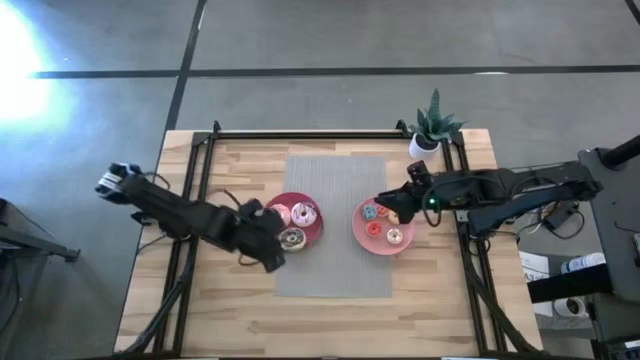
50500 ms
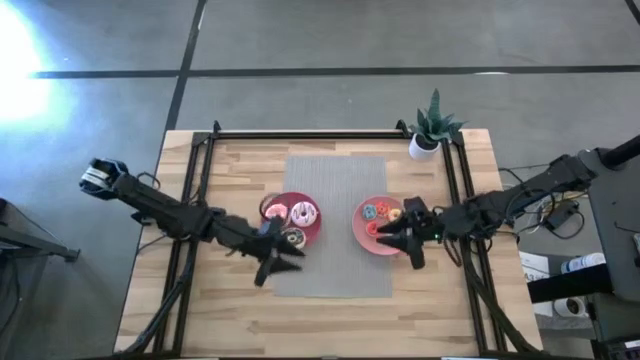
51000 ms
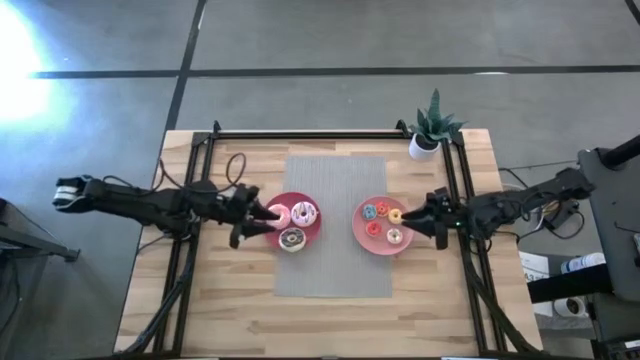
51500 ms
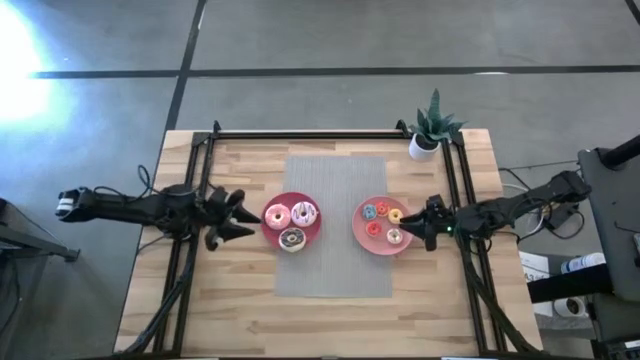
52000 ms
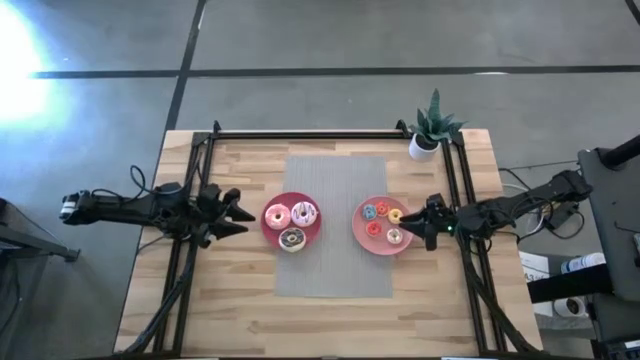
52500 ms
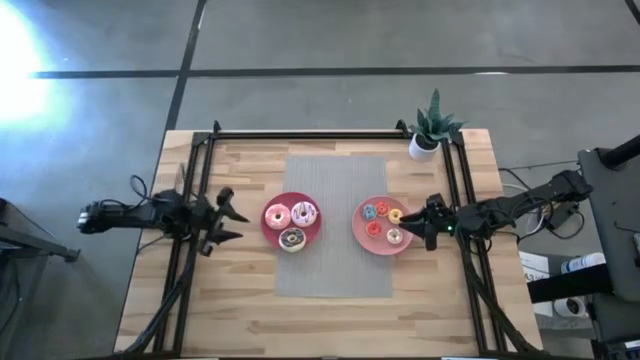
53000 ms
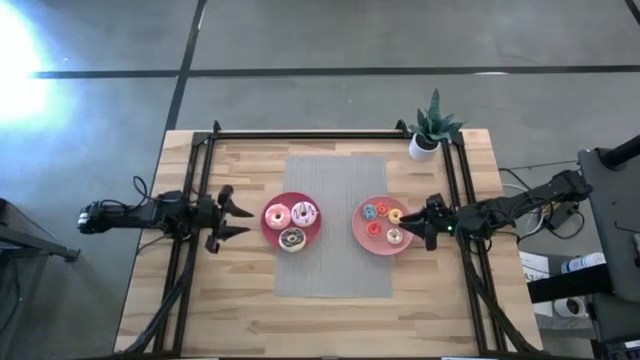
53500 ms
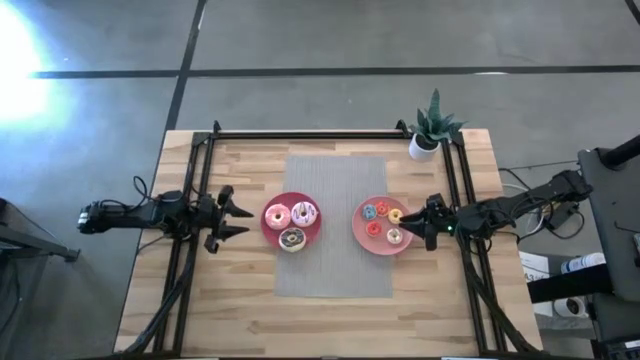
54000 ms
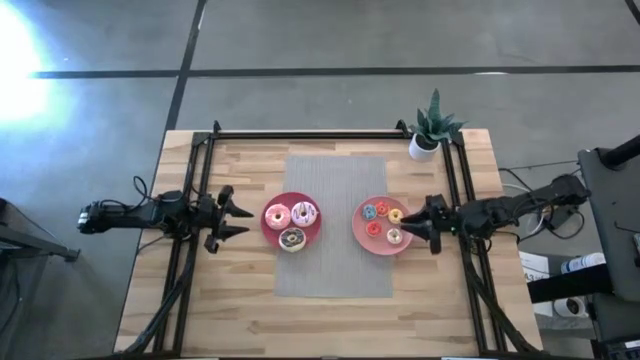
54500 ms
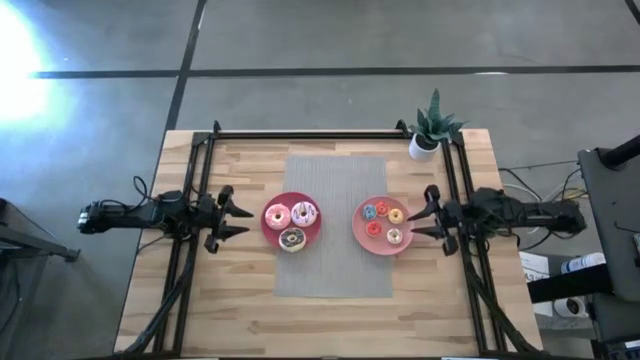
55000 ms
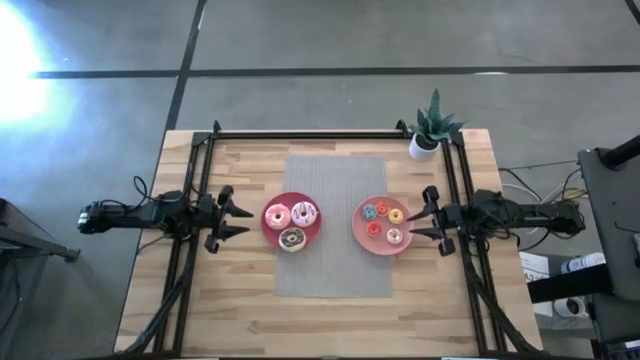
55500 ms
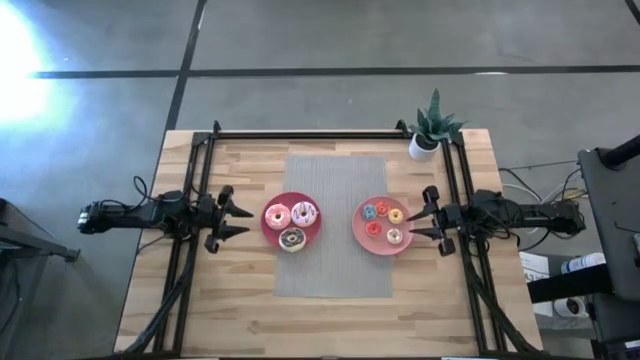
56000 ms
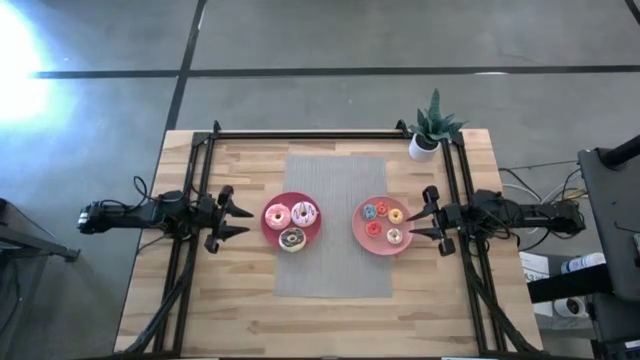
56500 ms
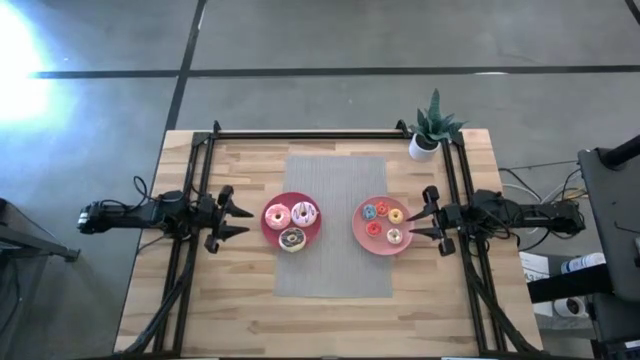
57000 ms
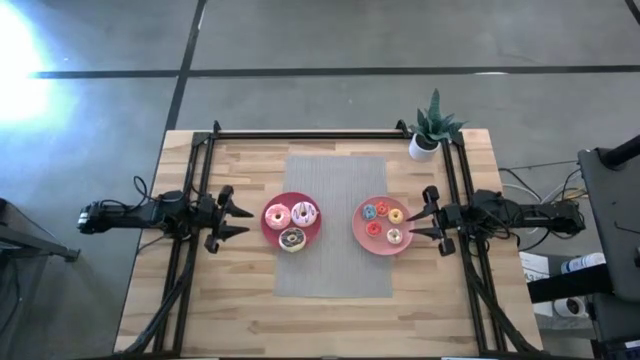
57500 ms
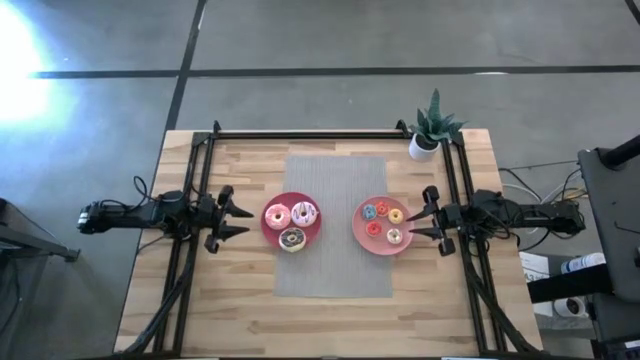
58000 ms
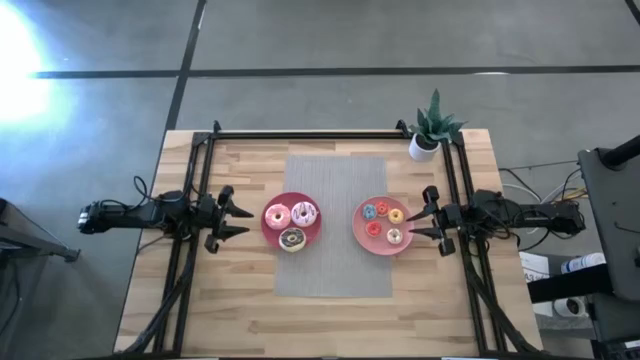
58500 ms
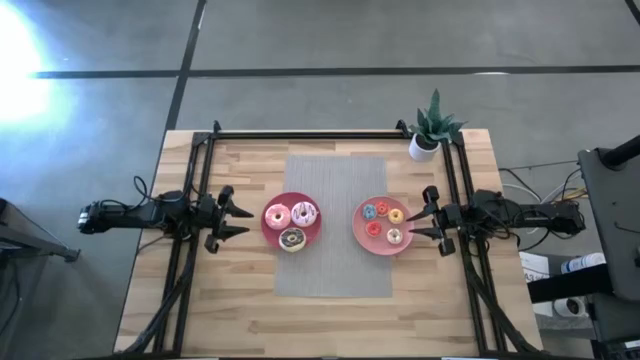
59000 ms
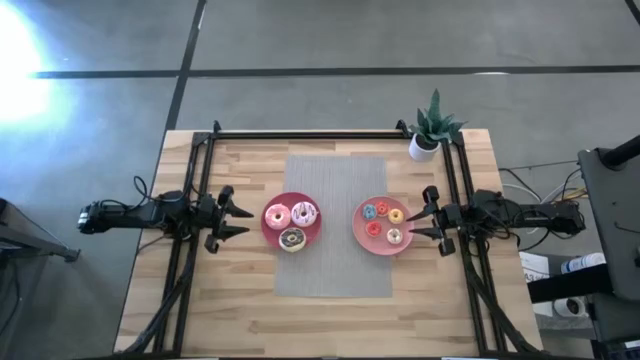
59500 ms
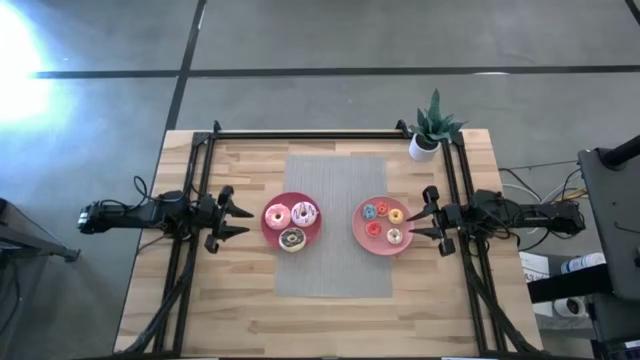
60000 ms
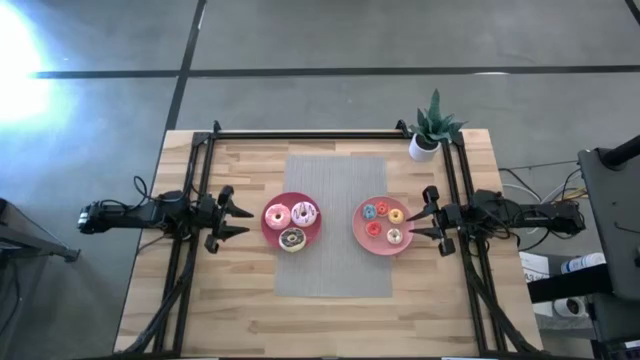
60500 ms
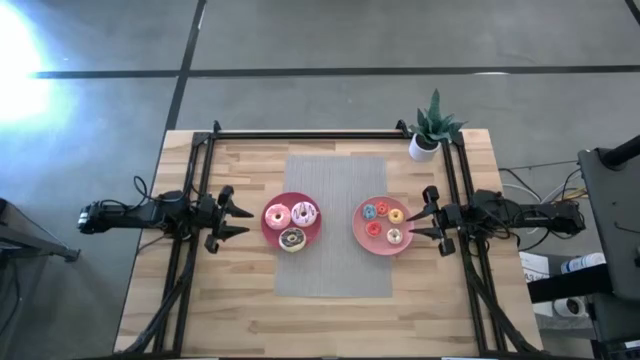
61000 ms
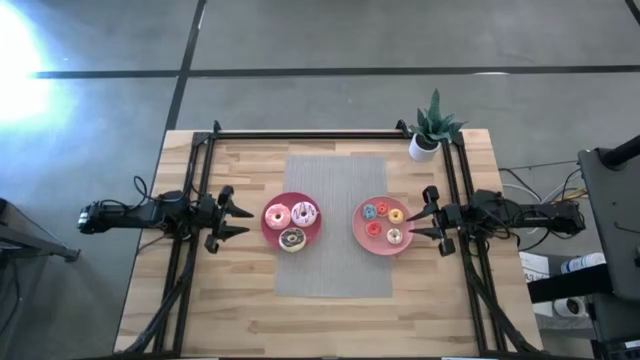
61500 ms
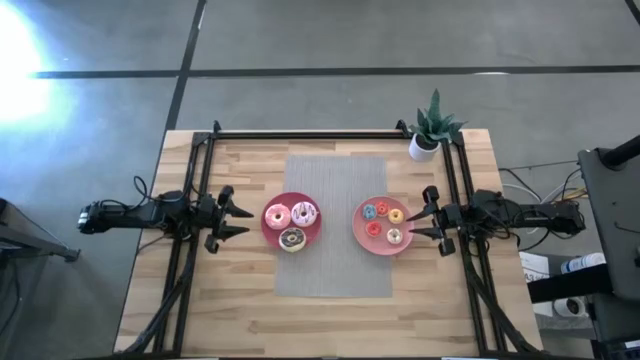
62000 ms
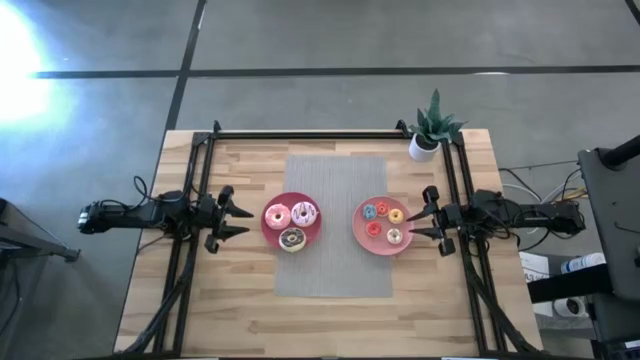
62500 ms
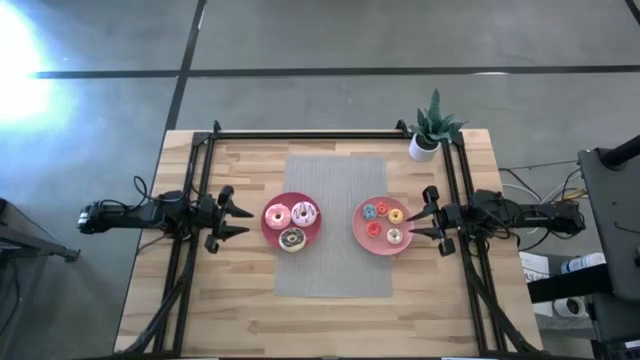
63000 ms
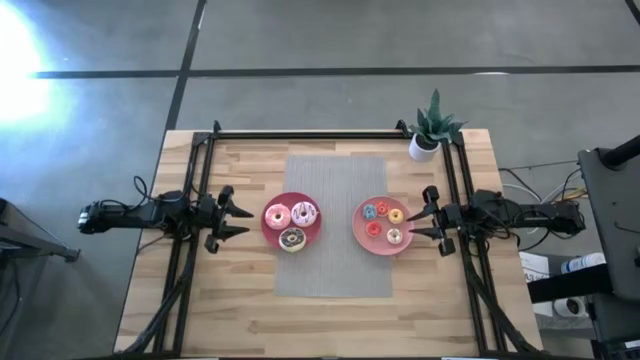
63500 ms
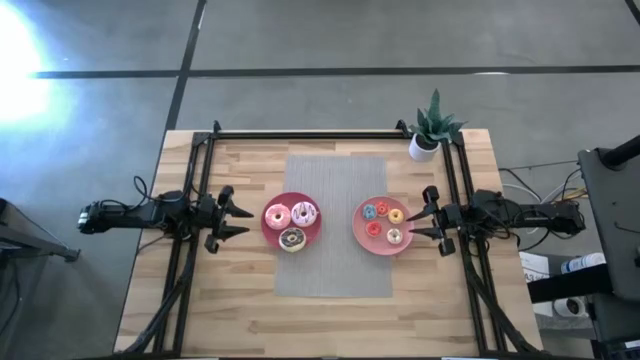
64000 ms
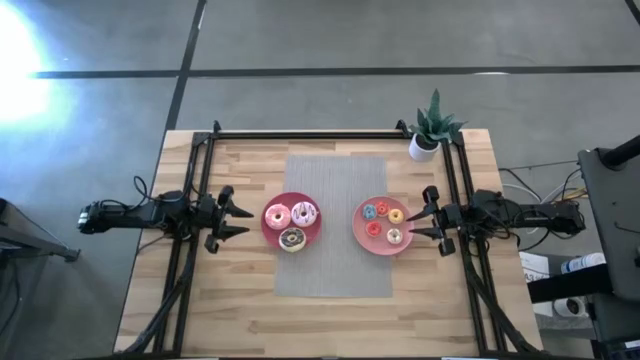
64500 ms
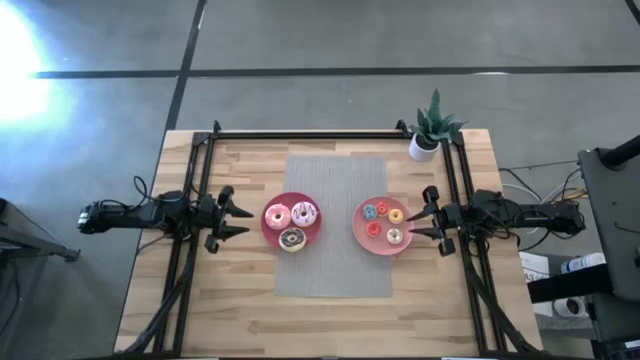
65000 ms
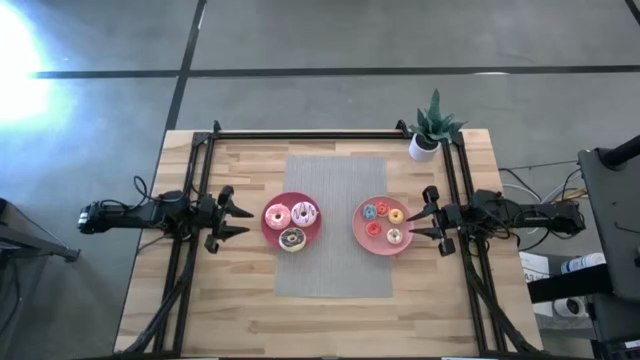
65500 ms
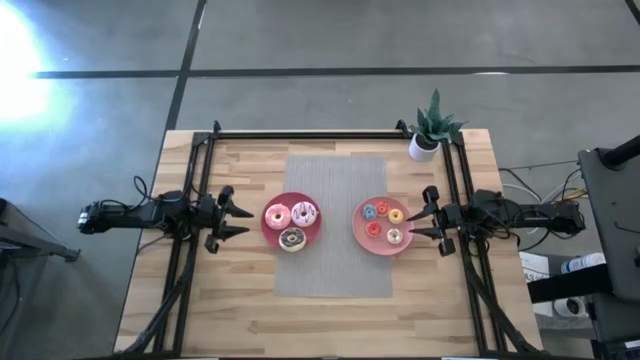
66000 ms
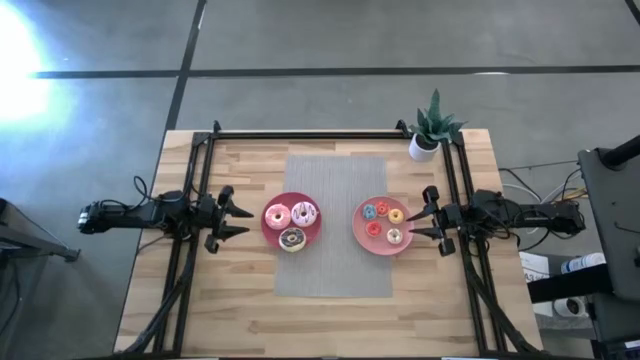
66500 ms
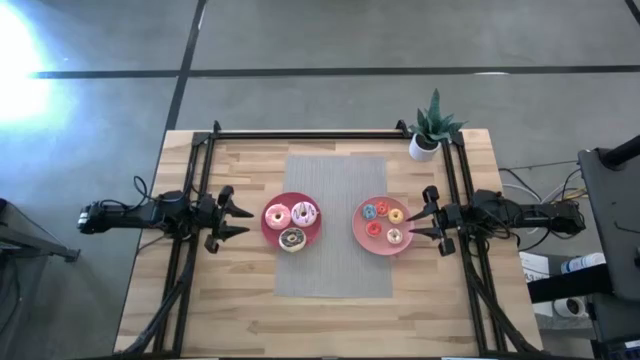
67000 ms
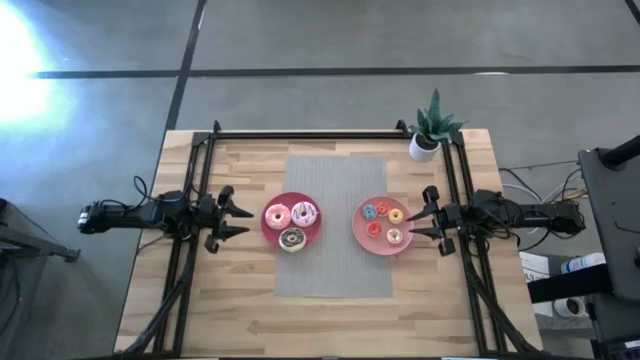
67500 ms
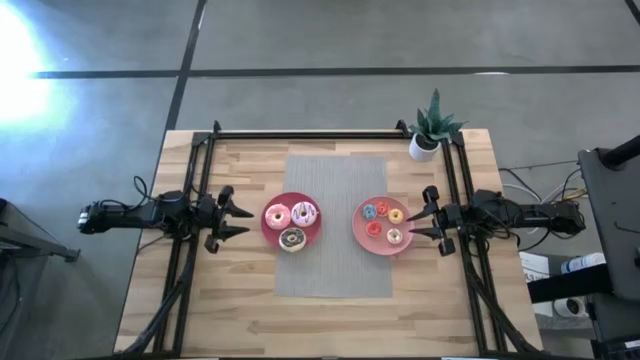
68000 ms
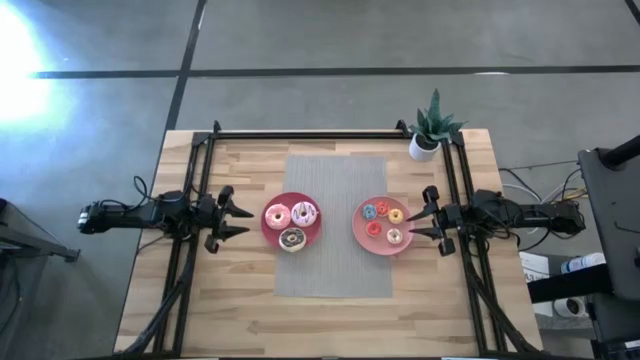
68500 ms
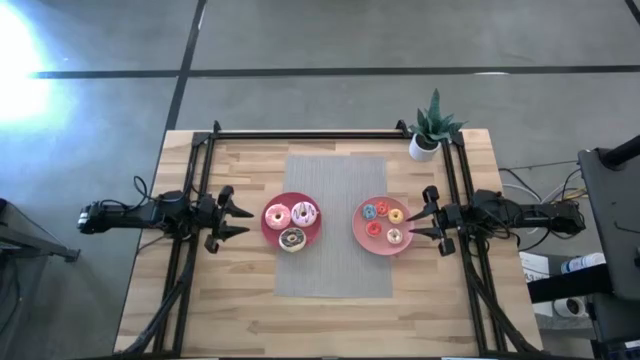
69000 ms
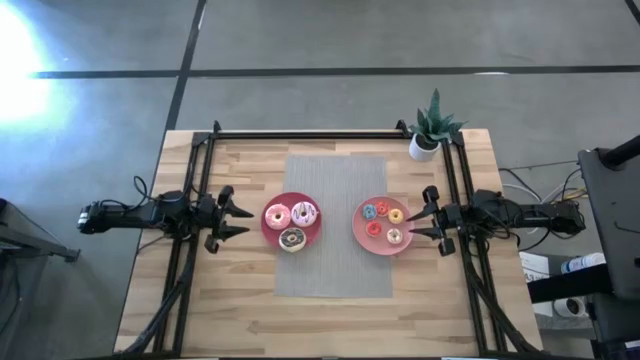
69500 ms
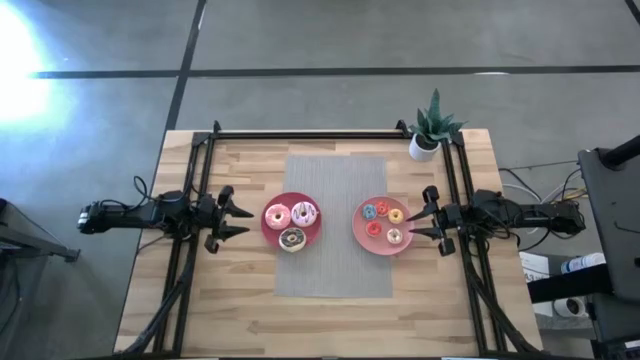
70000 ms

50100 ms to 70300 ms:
Task: Pick & Place donuts
Return to Home Position
